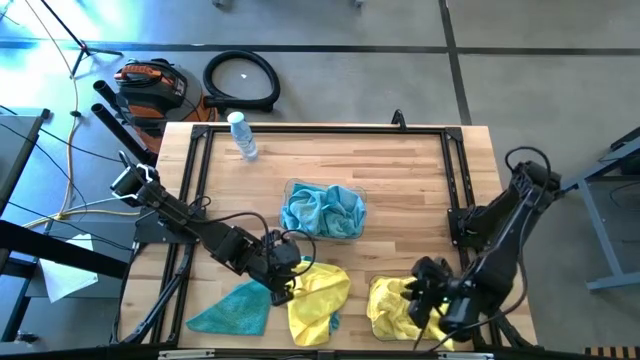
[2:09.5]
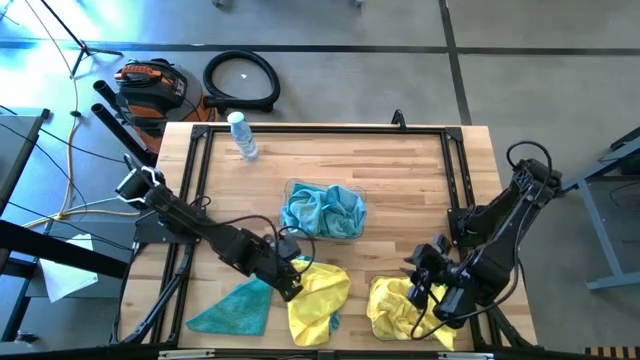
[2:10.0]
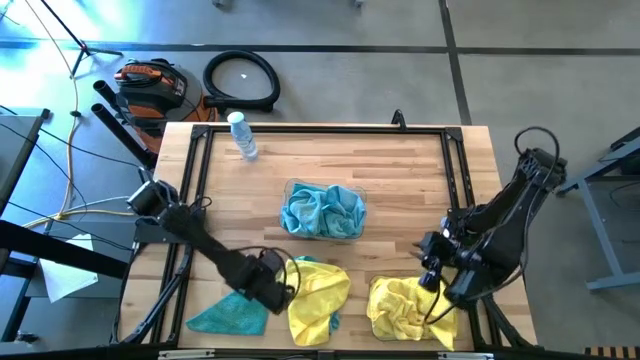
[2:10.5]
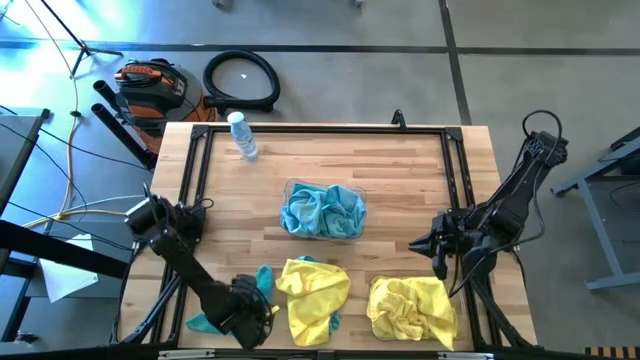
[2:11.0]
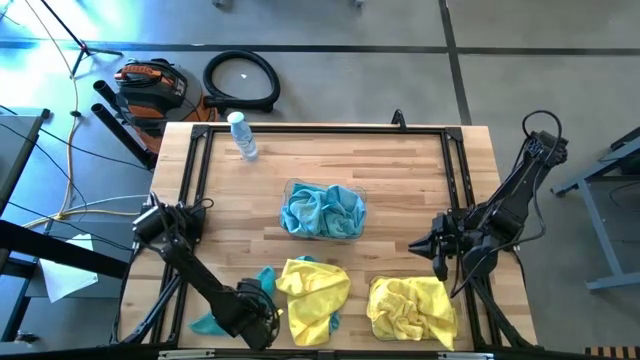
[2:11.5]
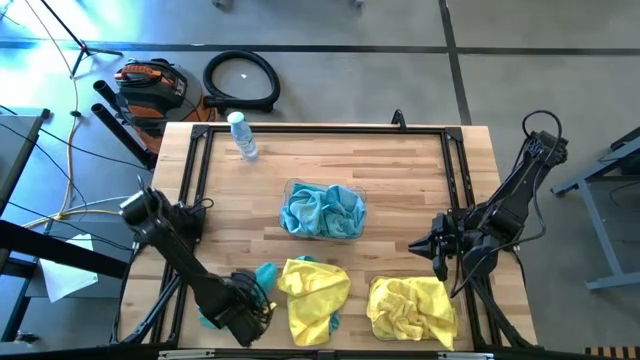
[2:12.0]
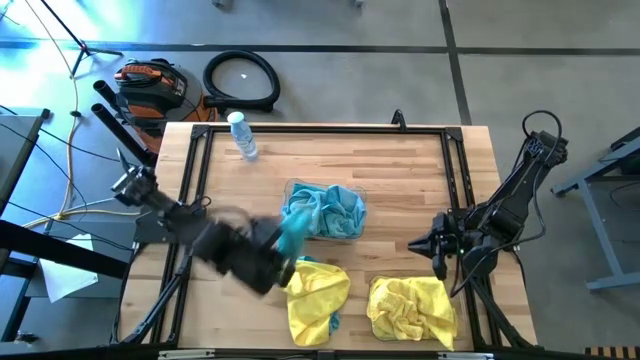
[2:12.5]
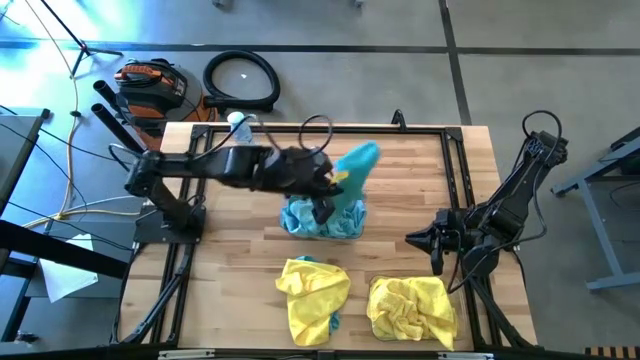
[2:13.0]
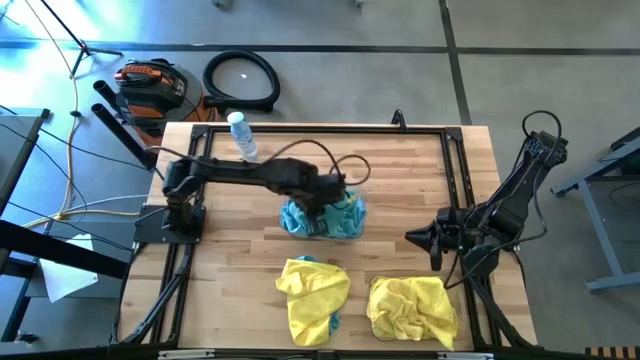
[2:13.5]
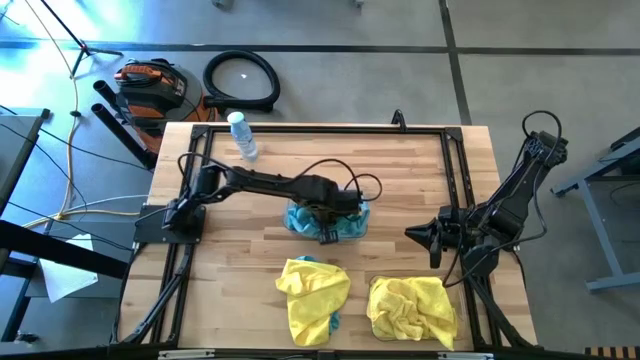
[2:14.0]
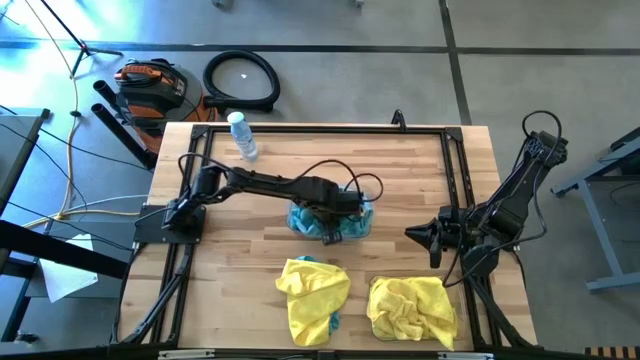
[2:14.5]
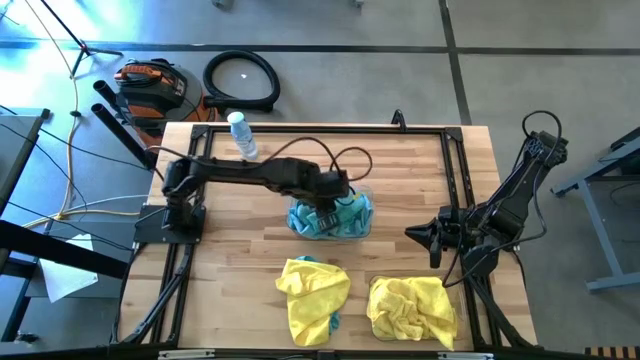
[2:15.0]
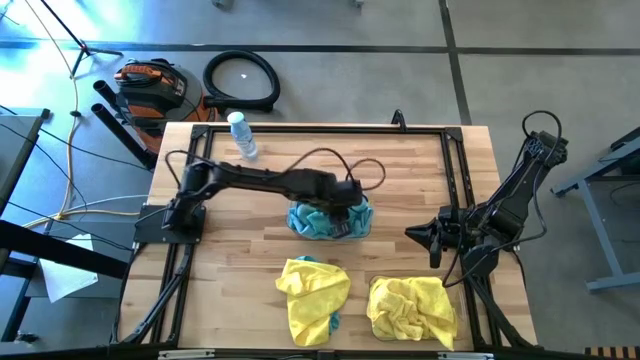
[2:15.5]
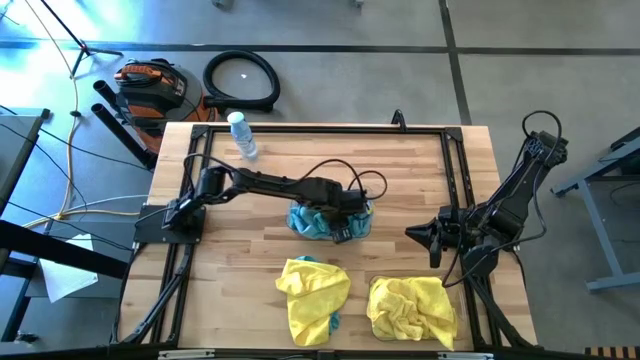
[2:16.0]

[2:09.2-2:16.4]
Task: Sort microfiber towel by color & place in baskets
Put the blue towel in the top transparent bin

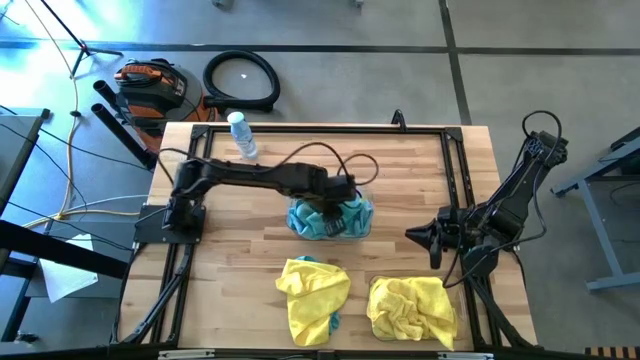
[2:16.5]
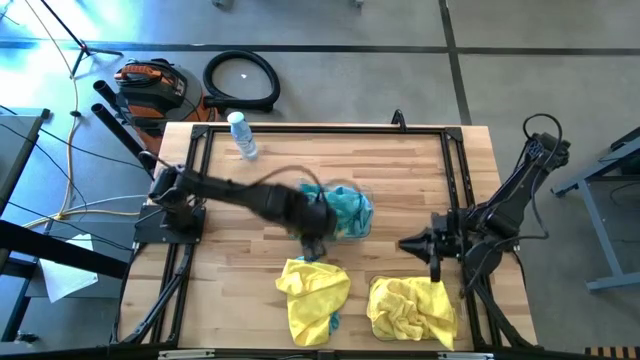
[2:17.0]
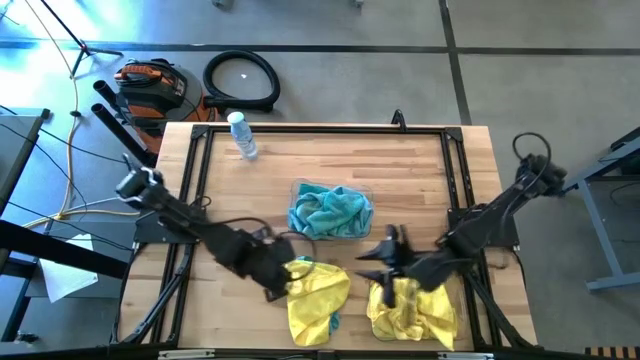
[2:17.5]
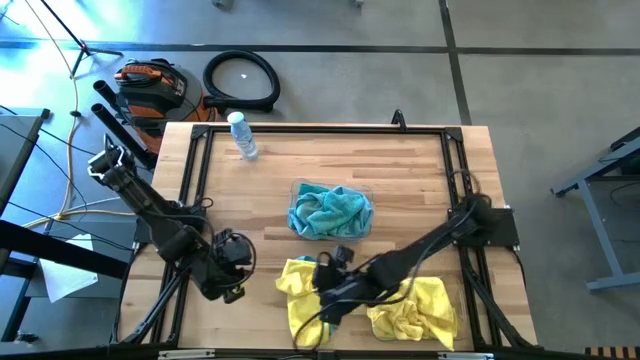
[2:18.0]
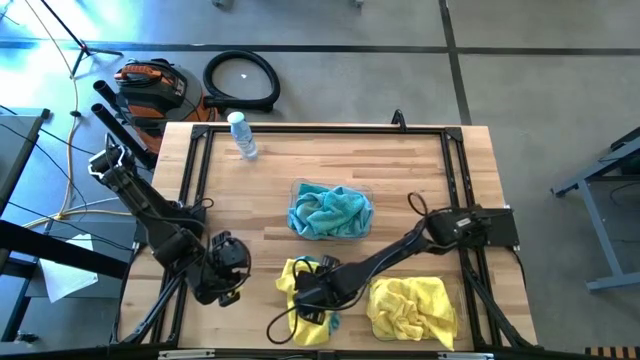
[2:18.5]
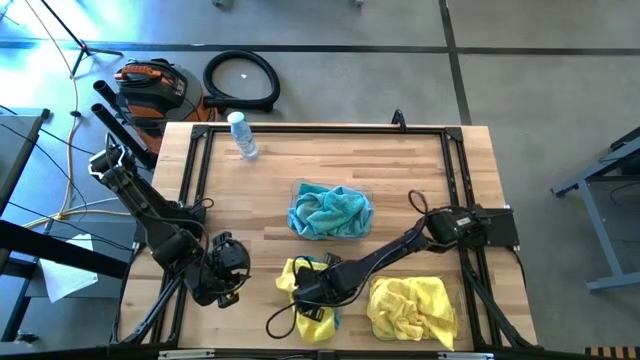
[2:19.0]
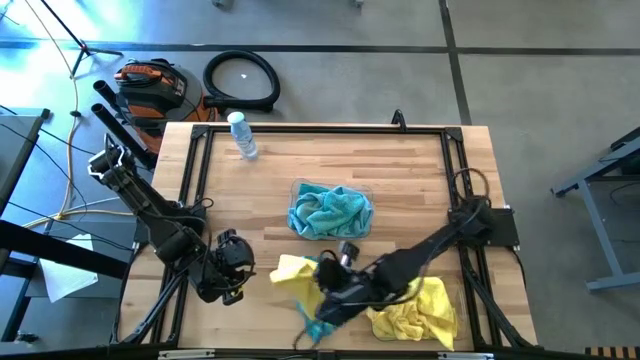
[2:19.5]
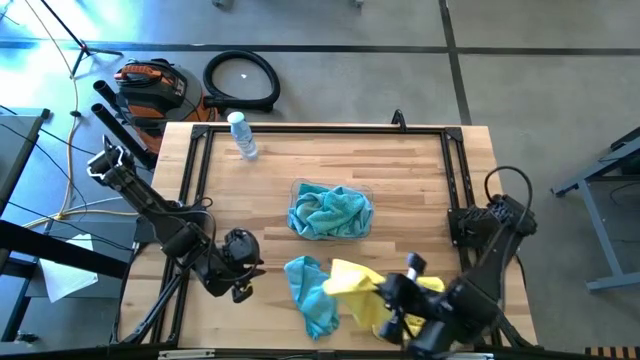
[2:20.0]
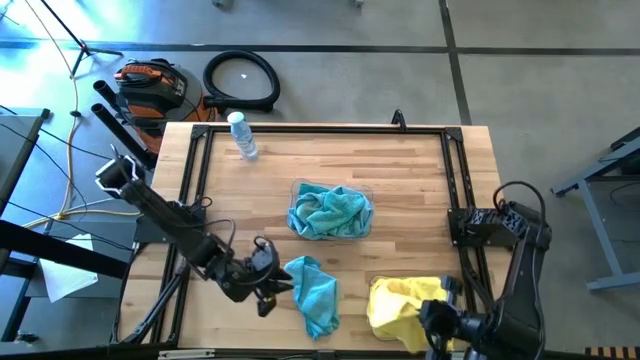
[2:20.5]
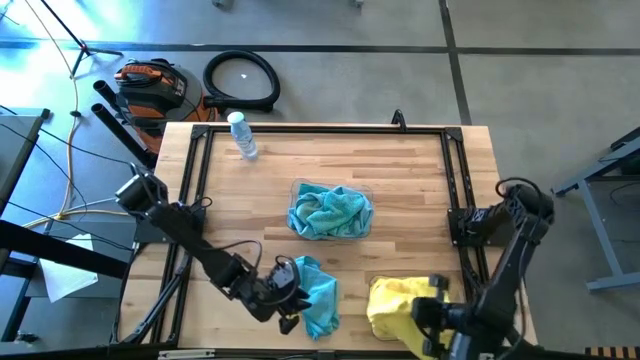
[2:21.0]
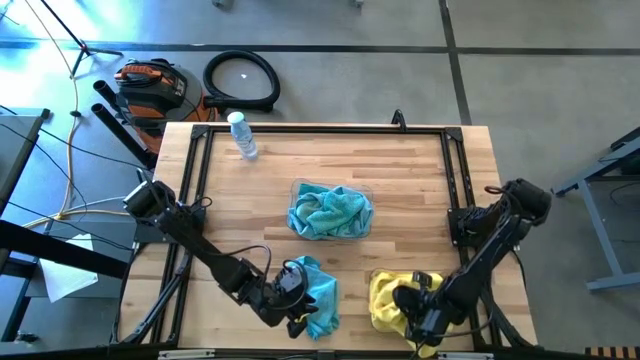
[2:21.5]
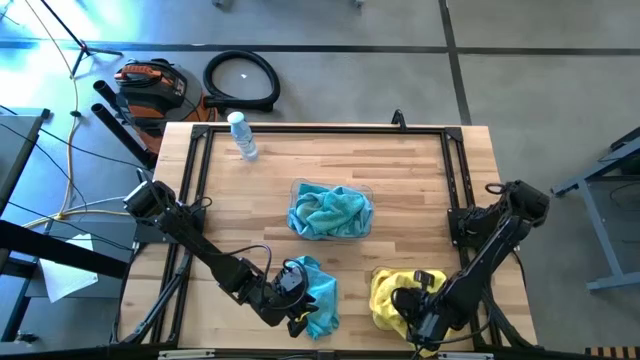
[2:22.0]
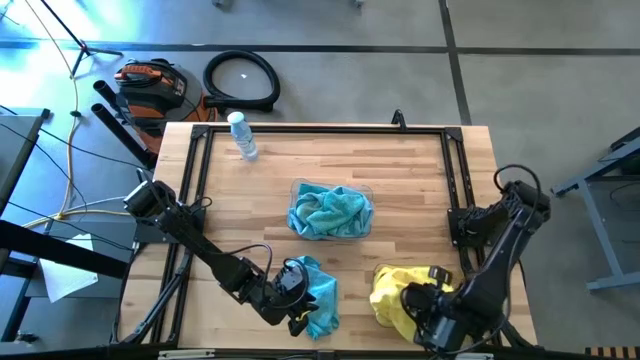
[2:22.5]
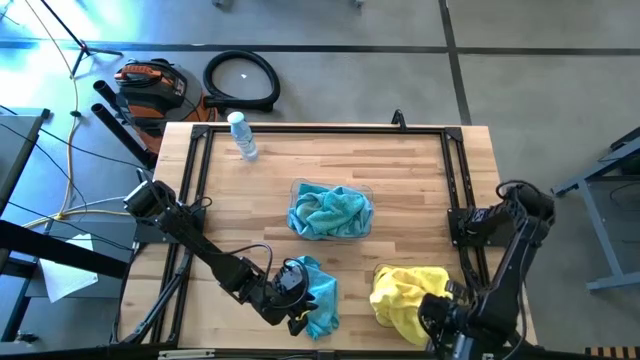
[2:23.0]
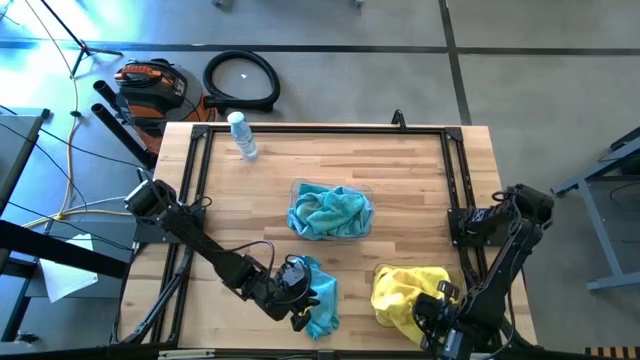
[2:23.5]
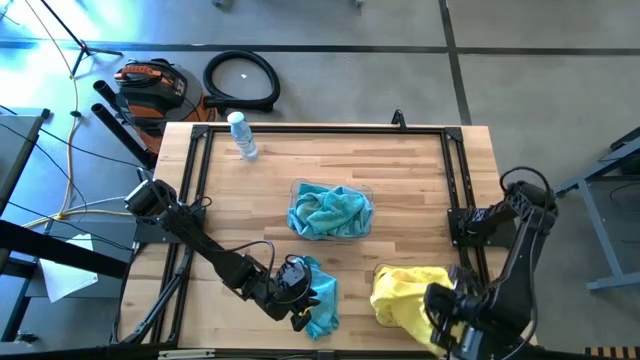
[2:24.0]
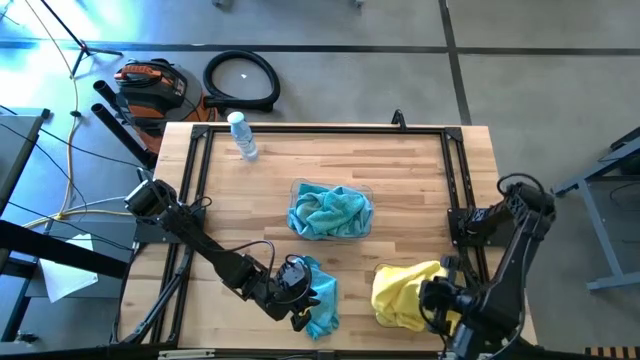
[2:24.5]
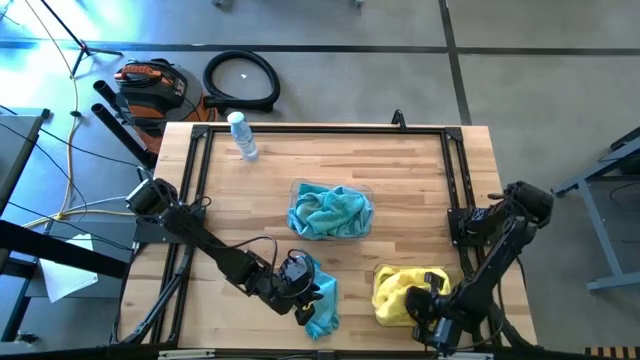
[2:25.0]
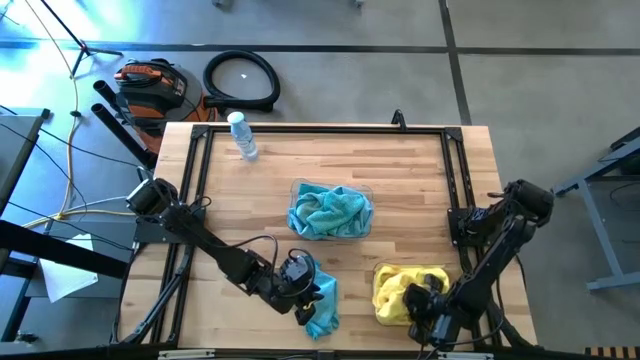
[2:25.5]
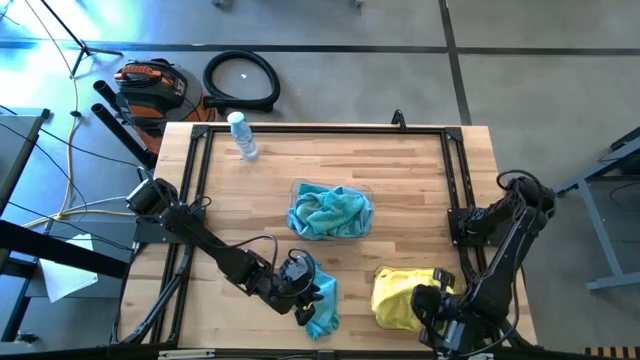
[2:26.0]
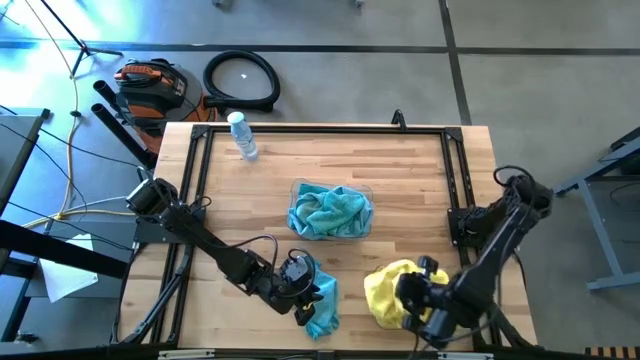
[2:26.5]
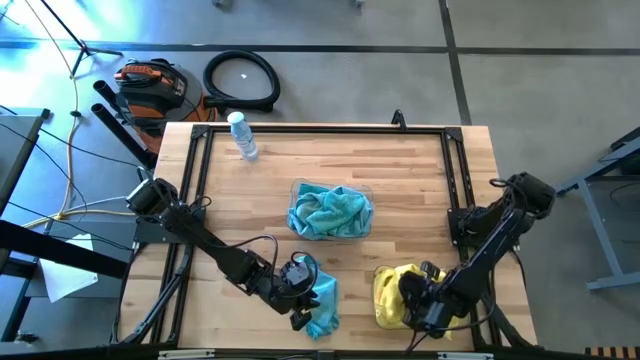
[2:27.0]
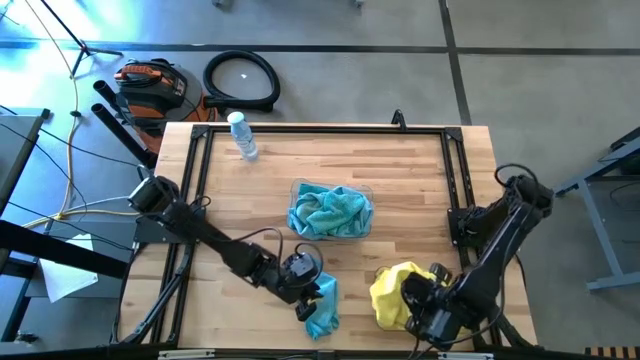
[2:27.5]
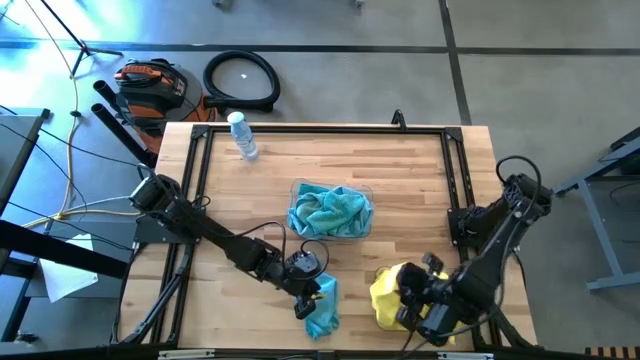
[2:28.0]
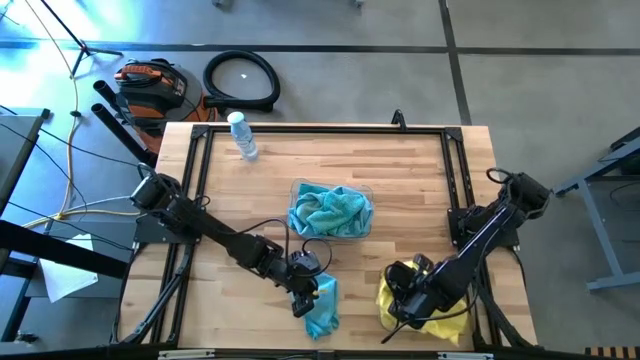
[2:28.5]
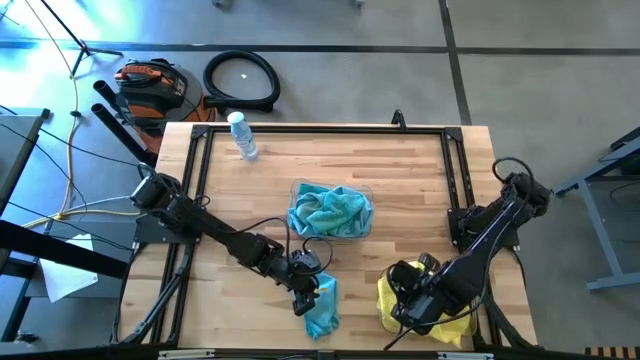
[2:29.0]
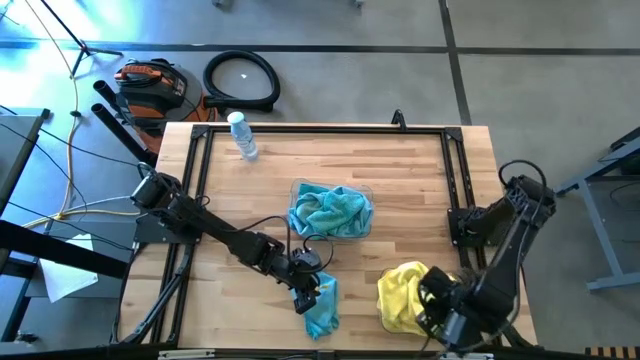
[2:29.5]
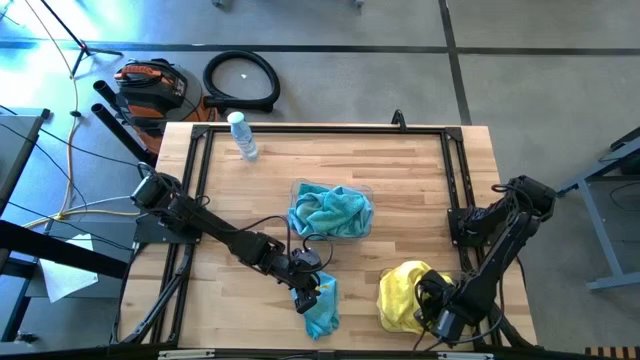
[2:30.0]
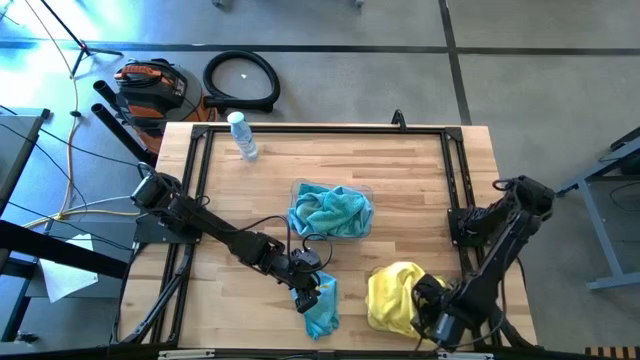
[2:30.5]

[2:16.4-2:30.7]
Put the yellow towel in the bottom transparent bin

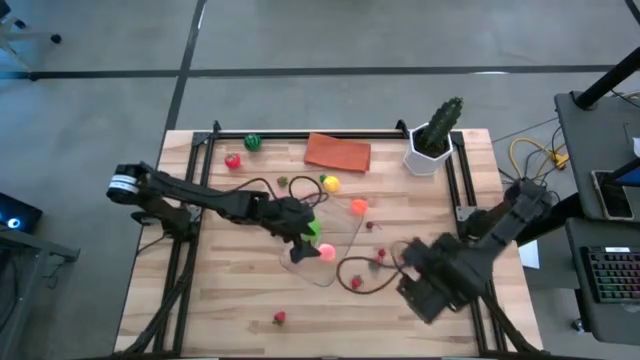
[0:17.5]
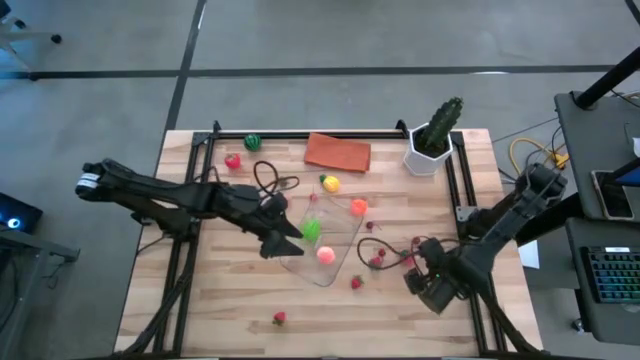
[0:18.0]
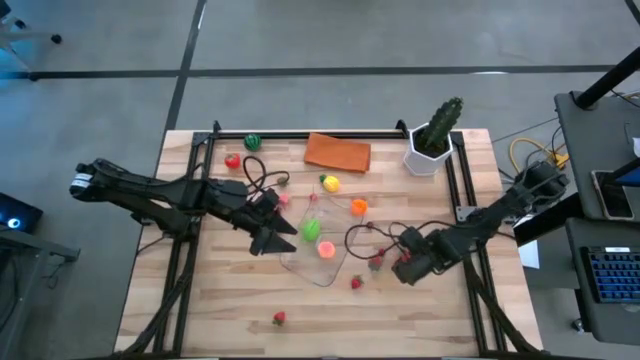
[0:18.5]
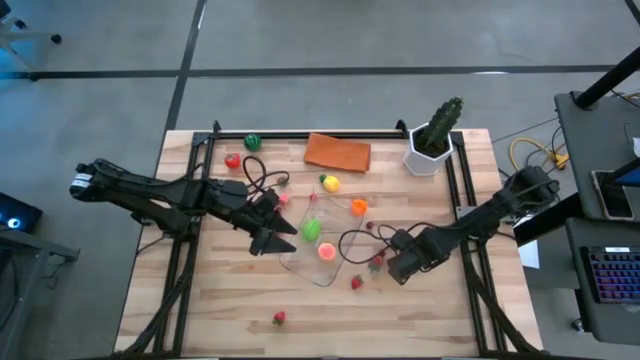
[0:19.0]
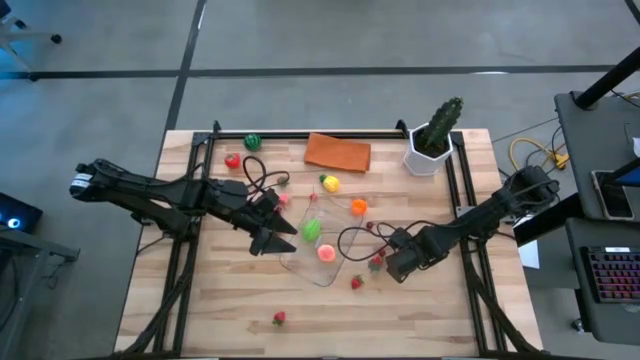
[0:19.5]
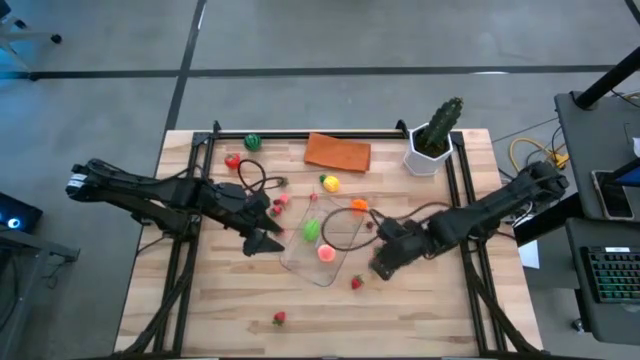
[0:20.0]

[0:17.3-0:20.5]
Task: Pick and placing Produce into tupperware
Put the strawberry into the transparent bin
